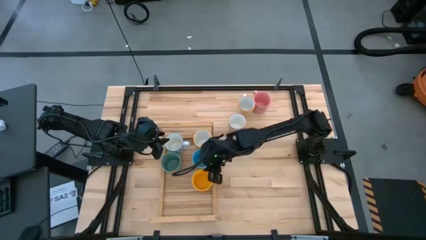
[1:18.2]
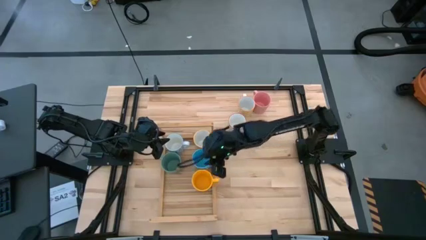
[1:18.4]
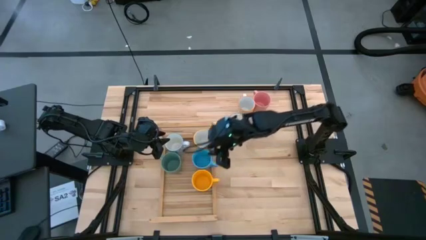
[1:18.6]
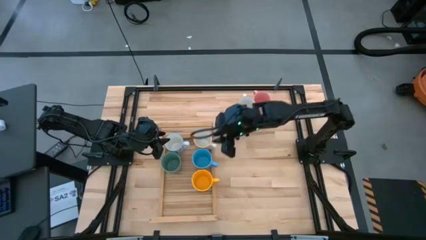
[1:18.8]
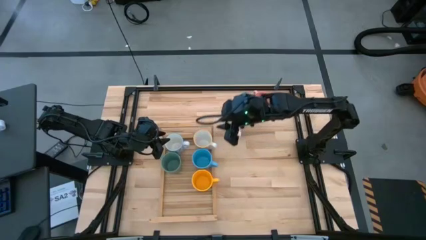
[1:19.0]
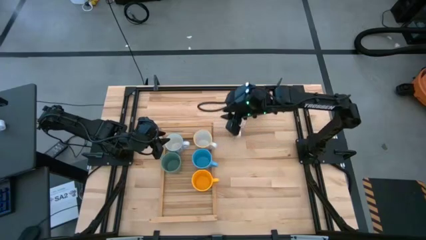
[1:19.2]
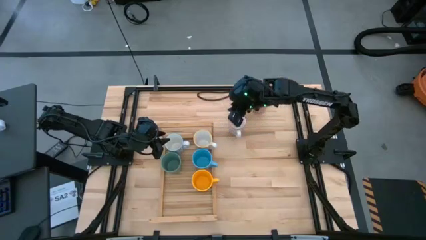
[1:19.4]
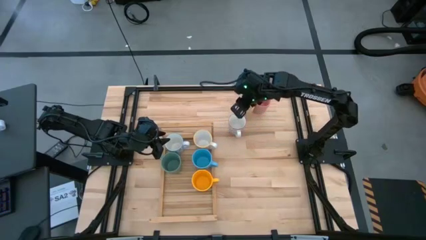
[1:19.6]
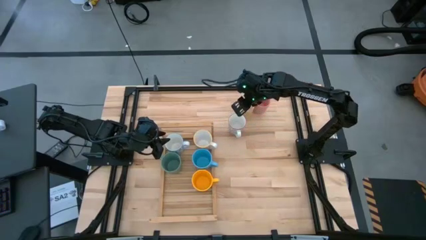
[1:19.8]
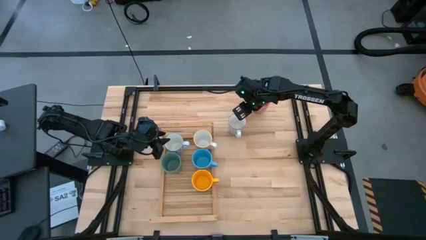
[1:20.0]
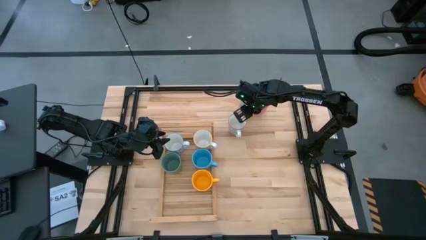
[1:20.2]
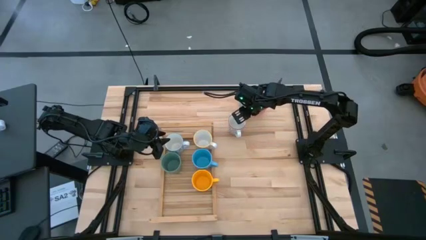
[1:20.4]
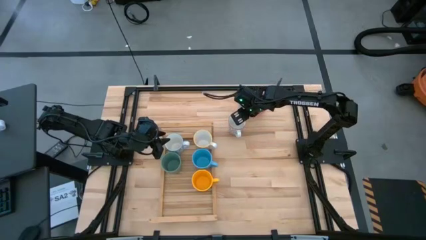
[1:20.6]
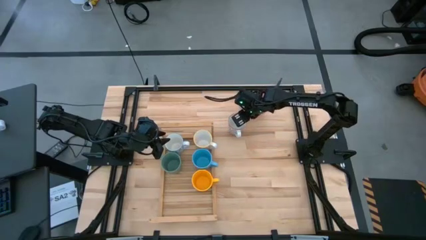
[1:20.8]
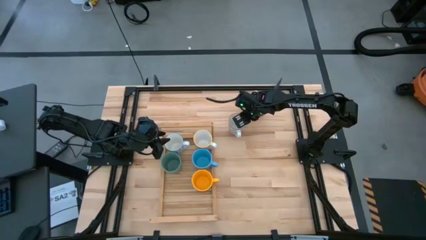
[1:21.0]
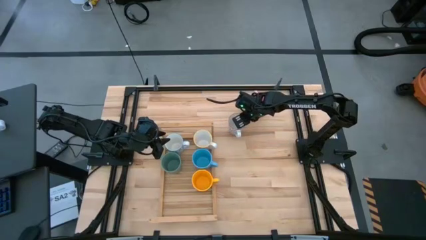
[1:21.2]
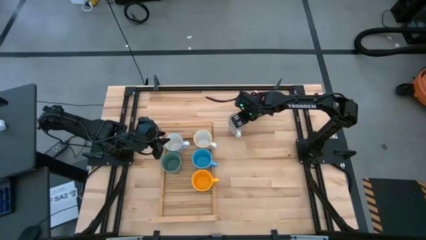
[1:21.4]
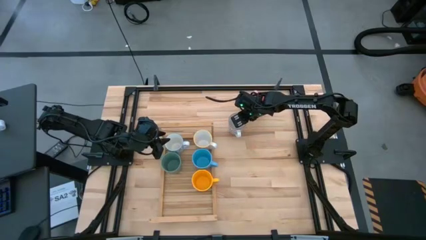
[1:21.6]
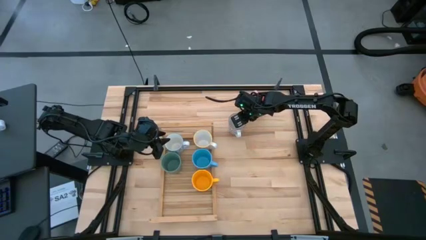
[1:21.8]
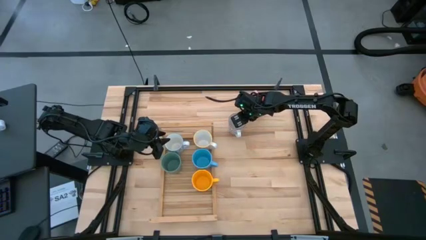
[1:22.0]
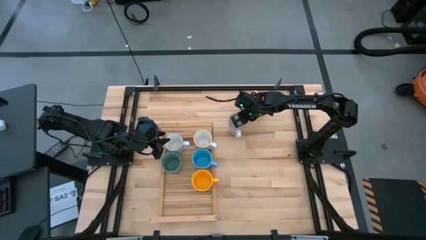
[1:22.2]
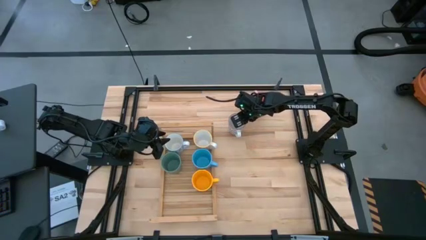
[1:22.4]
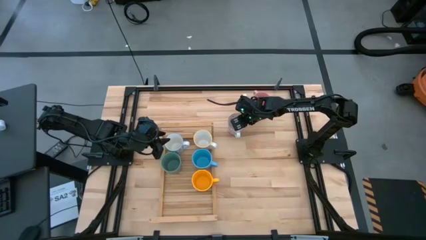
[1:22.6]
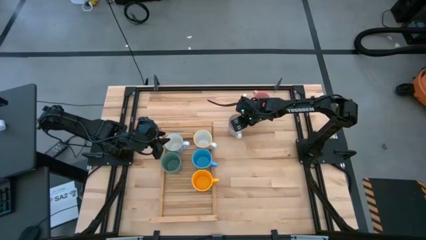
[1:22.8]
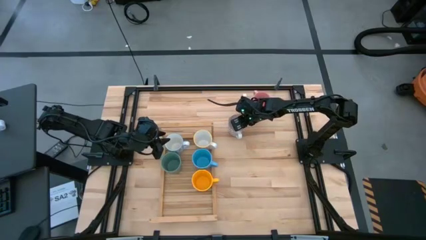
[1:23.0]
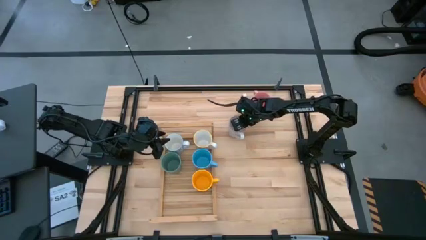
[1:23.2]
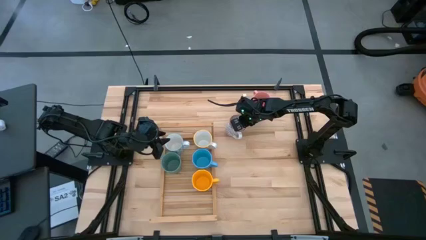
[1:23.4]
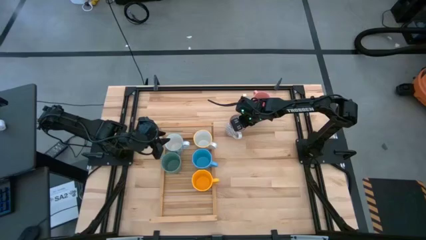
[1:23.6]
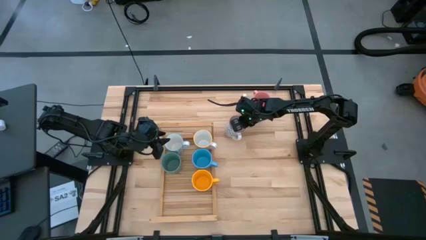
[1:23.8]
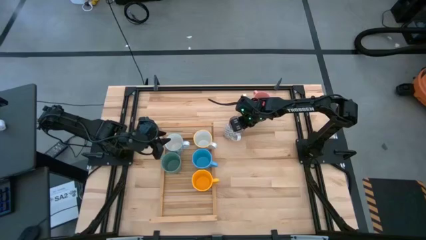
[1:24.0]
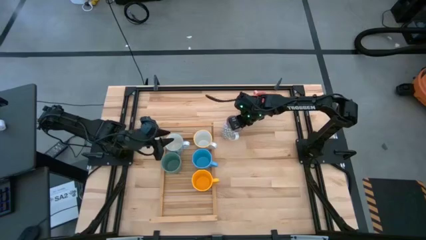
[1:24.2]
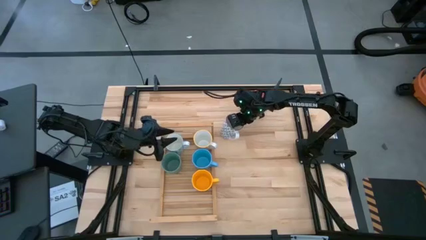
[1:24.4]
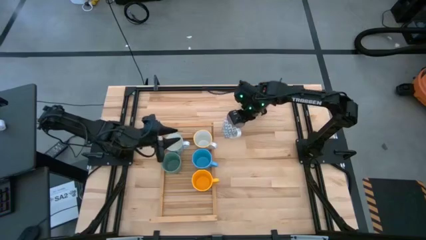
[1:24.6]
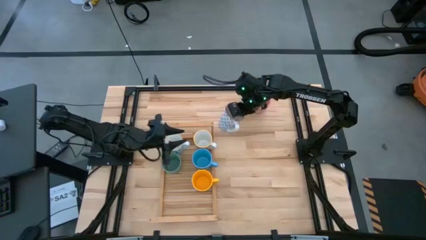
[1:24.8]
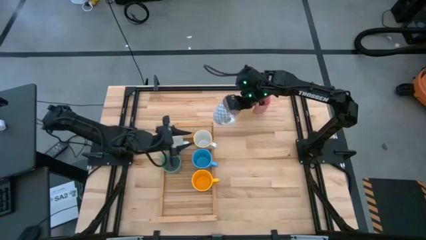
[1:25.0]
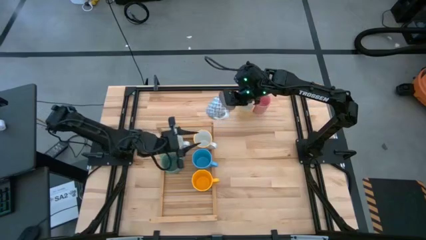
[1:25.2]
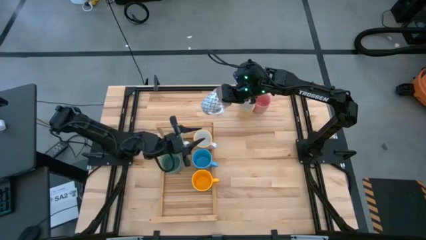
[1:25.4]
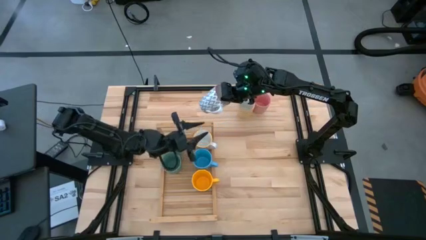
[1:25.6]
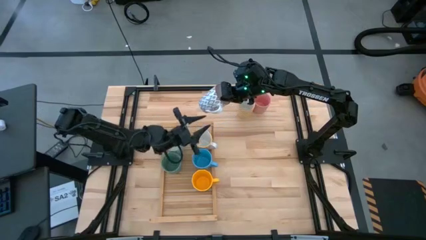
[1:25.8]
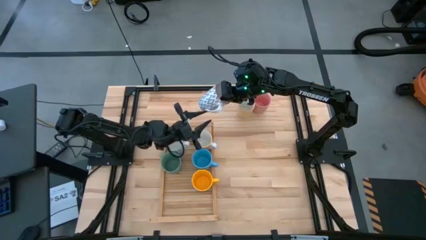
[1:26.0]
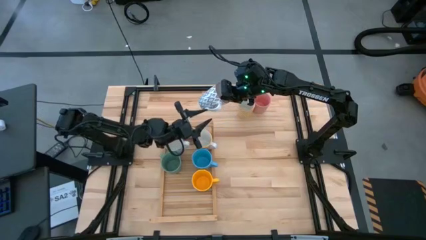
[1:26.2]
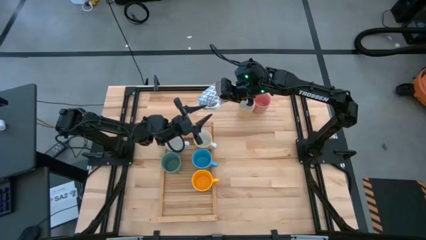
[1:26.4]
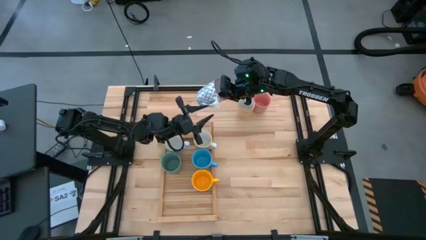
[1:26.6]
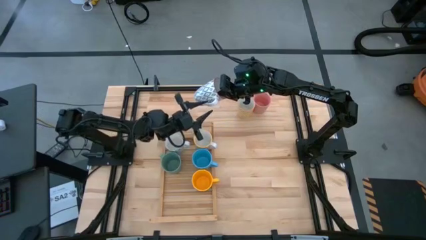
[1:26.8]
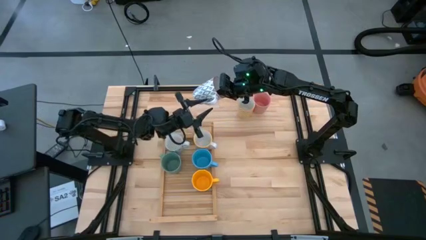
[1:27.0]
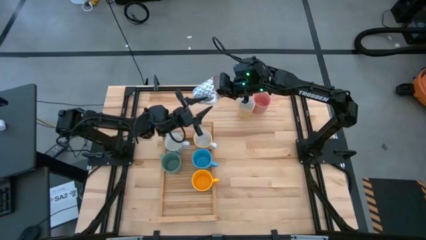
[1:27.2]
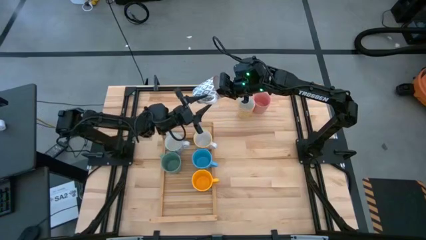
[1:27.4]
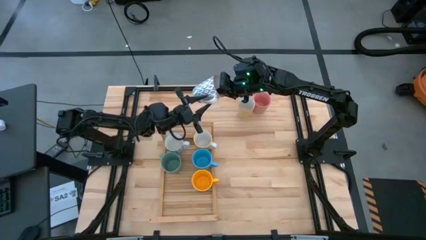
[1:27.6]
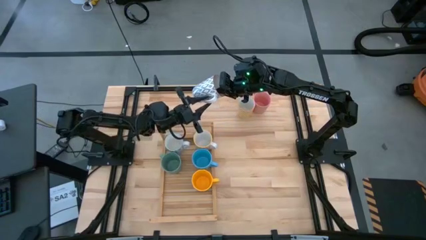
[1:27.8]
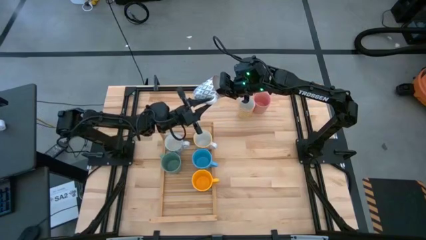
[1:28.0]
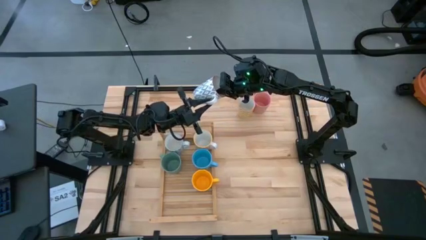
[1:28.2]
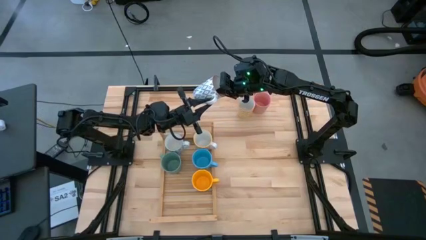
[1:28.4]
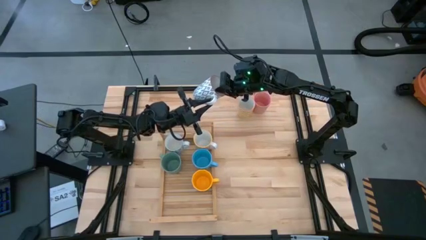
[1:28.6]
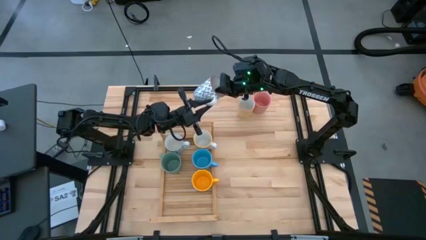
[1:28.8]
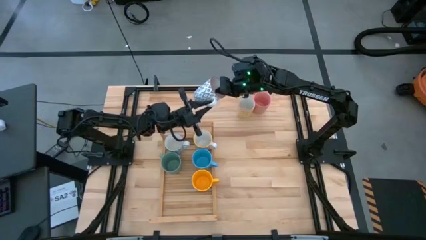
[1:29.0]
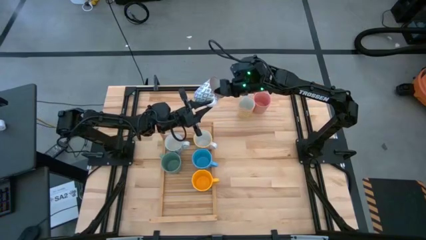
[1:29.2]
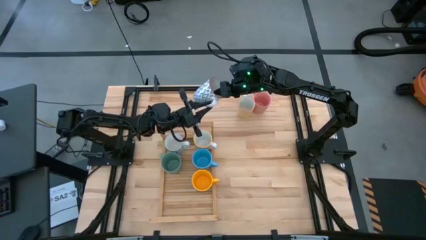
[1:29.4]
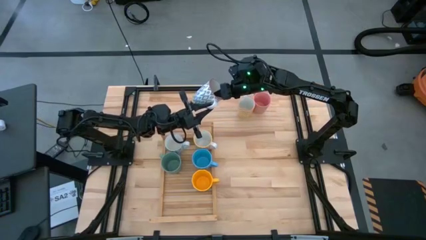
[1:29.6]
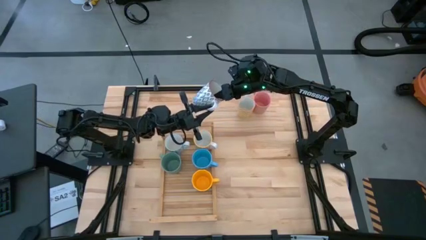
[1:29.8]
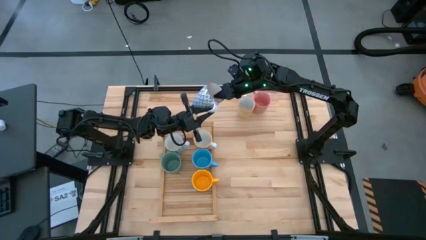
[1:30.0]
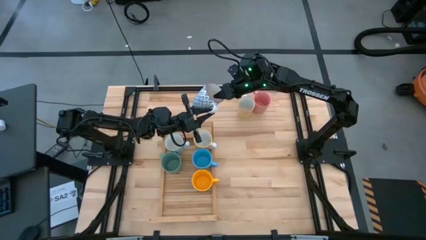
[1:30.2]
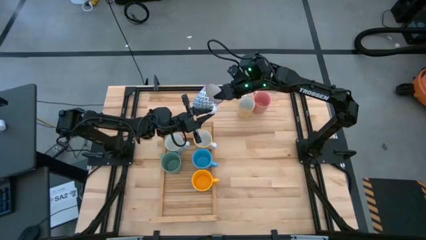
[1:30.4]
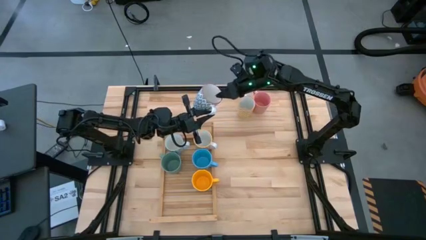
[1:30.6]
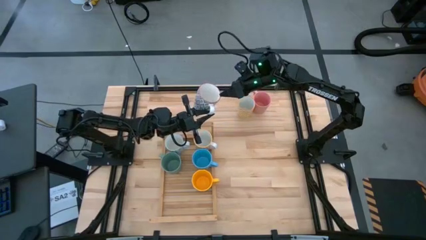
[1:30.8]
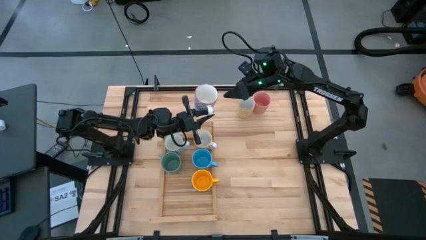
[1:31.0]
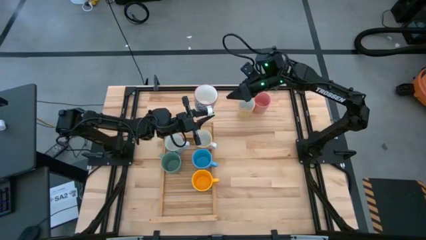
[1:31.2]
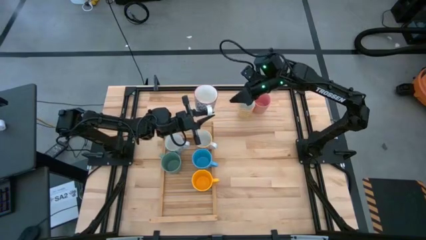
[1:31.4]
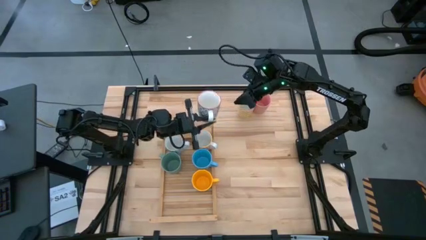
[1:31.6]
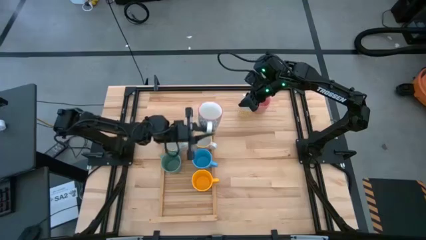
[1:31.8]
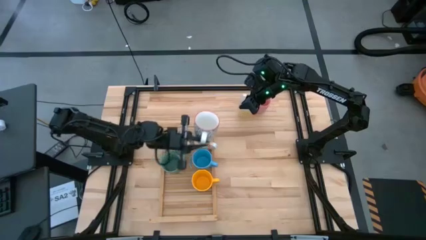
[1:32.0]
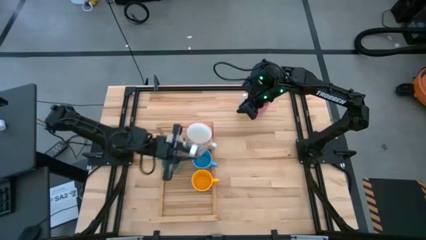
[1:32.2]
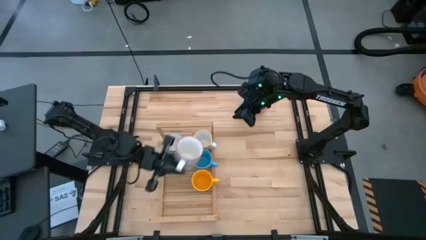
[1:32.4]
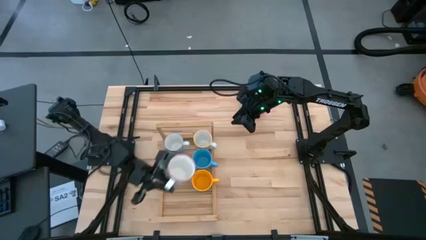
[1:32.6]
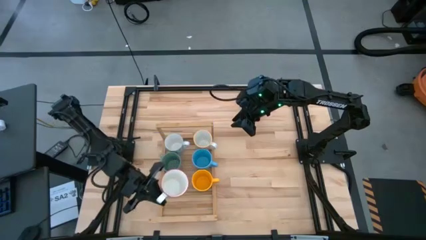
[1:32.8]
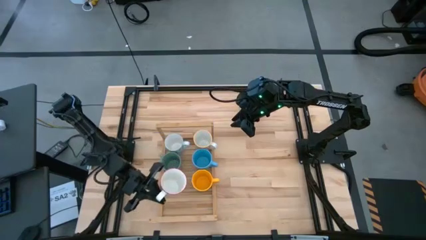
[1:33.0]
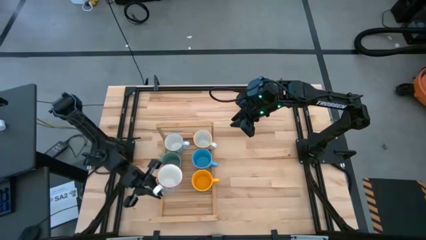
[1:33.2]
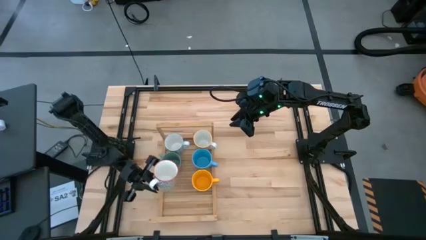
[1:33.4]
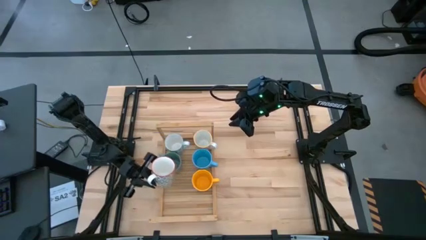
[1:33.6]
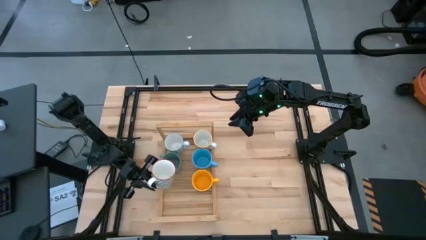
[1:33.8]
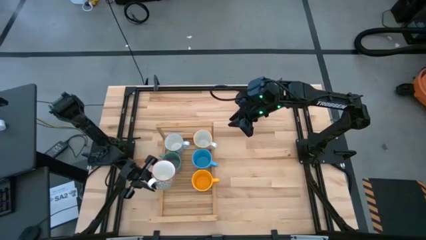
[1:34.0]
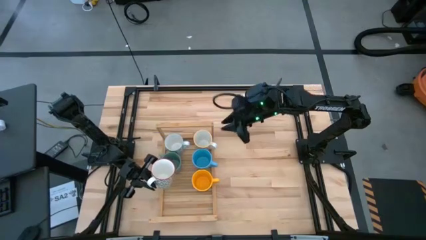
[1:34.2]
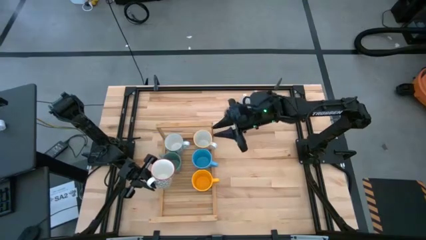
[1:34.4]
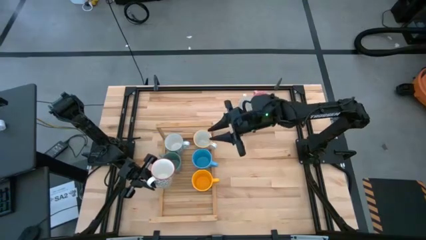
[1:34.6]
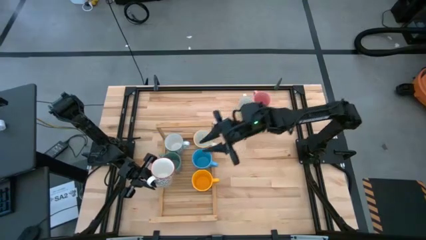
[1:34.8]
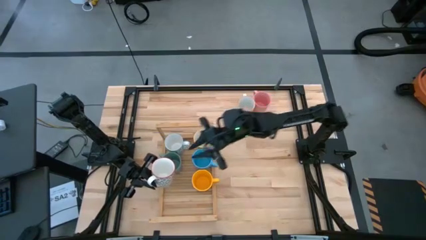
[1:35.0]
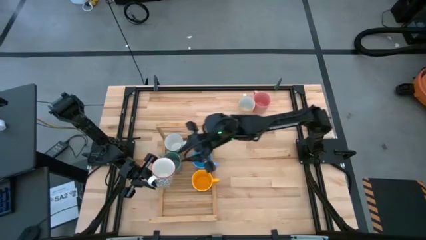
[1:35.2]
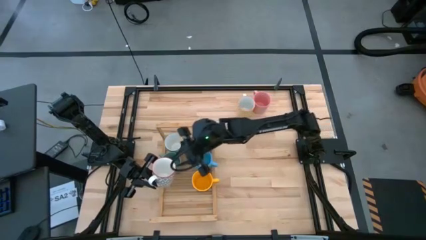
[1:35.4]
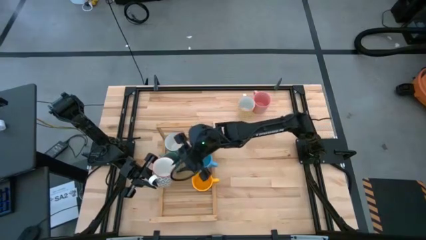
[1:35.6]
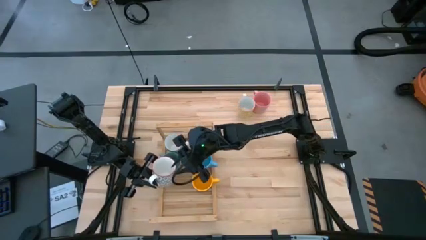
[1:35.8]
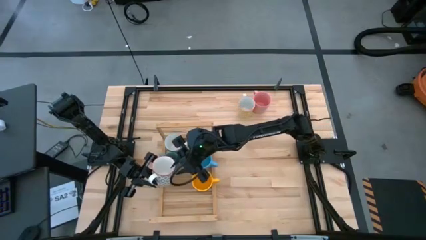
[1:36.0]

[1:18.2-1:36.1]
Task: Place coffee mugs
Put the gray and white mug on the shelf aligned with the dark yellow mug
